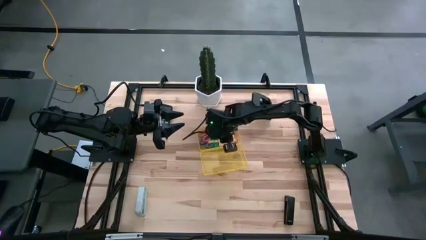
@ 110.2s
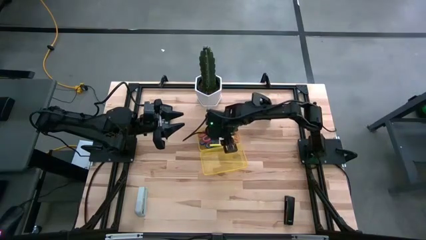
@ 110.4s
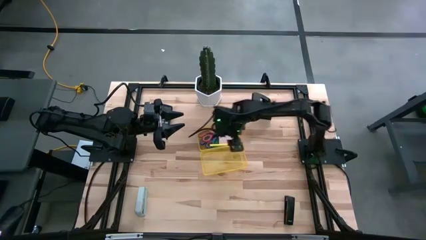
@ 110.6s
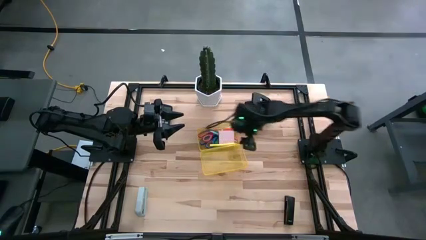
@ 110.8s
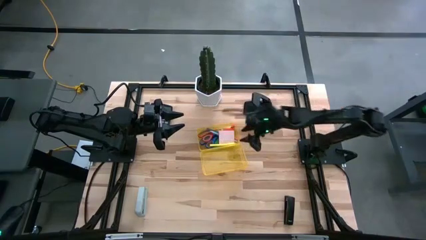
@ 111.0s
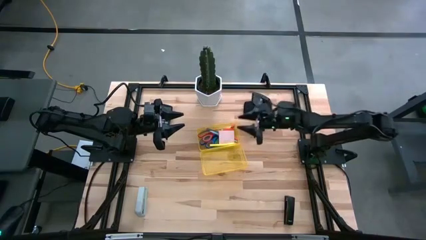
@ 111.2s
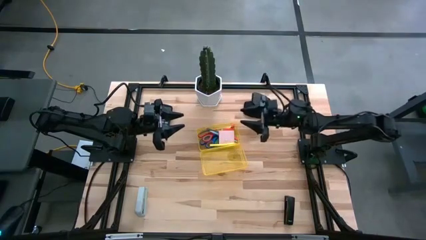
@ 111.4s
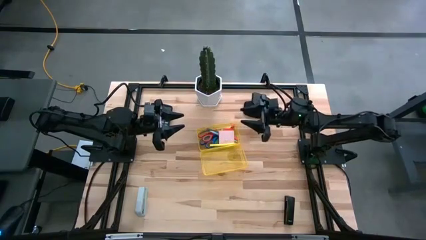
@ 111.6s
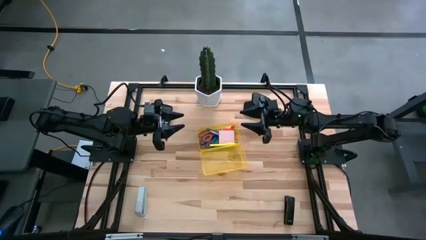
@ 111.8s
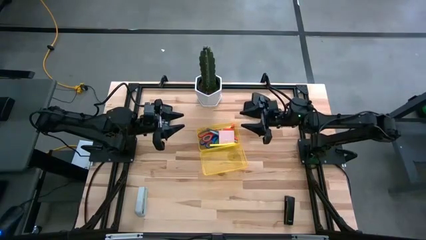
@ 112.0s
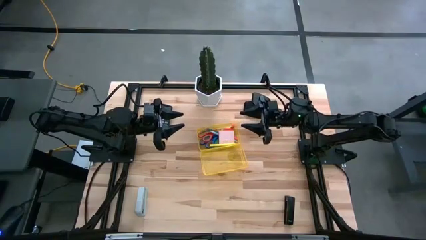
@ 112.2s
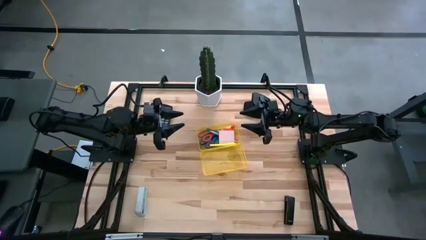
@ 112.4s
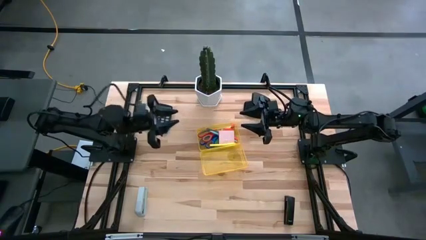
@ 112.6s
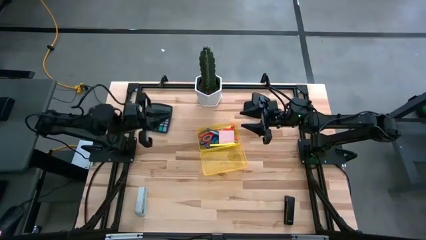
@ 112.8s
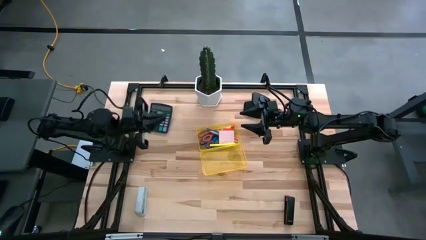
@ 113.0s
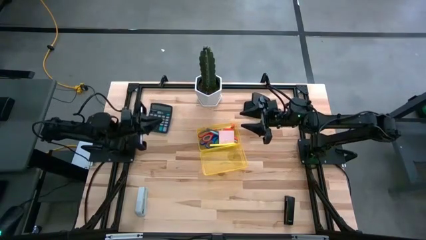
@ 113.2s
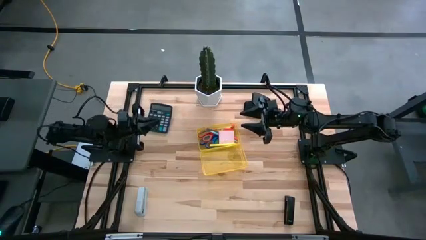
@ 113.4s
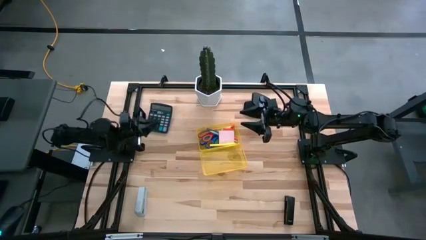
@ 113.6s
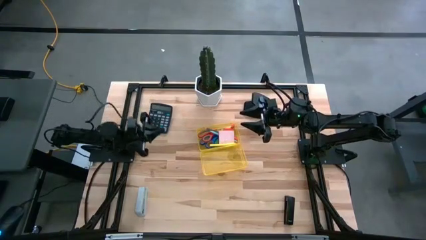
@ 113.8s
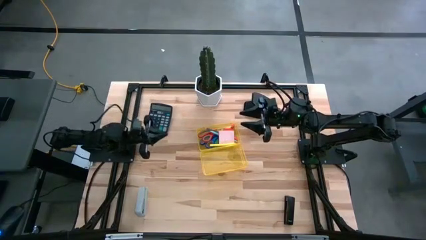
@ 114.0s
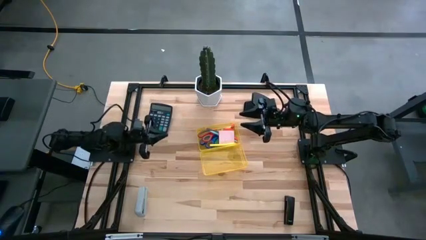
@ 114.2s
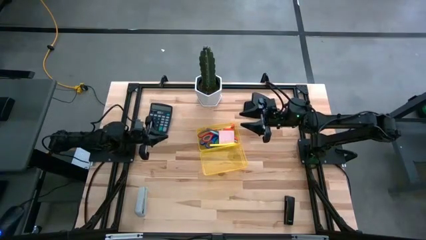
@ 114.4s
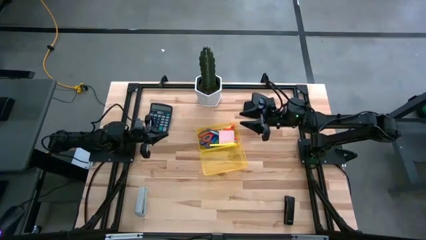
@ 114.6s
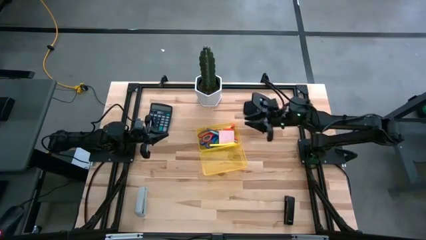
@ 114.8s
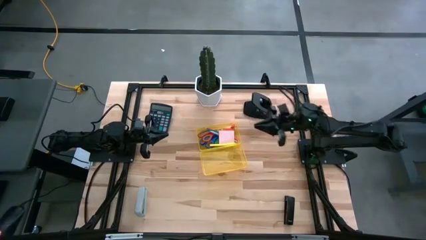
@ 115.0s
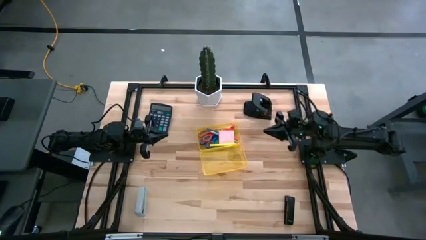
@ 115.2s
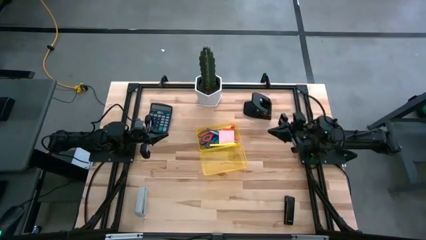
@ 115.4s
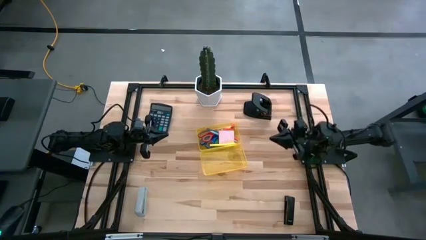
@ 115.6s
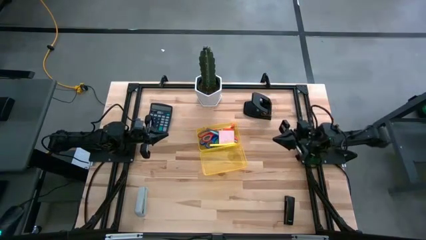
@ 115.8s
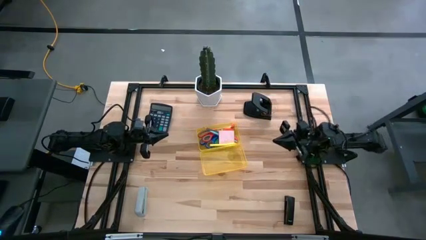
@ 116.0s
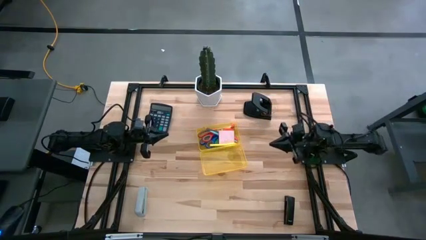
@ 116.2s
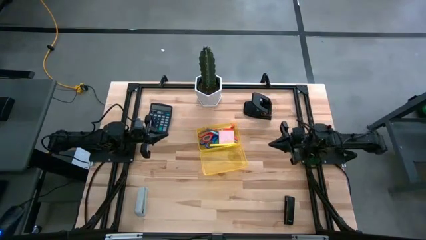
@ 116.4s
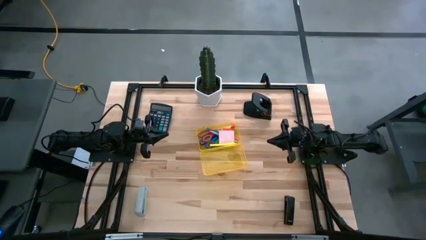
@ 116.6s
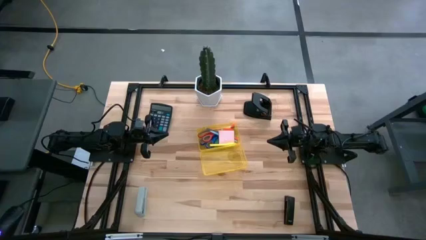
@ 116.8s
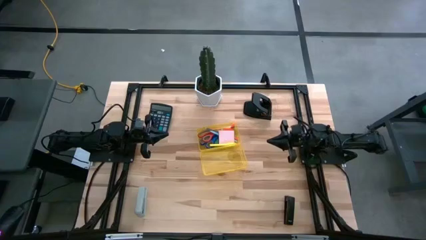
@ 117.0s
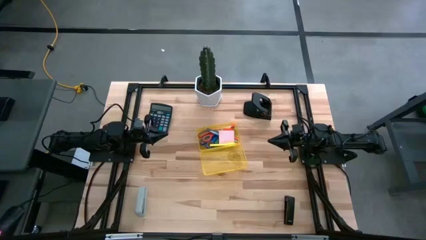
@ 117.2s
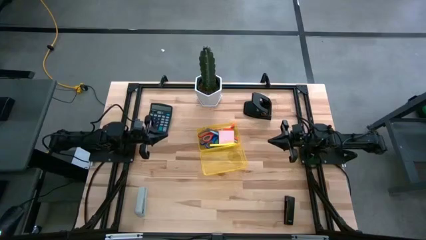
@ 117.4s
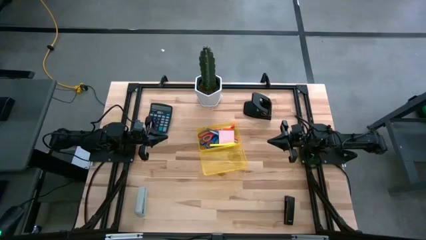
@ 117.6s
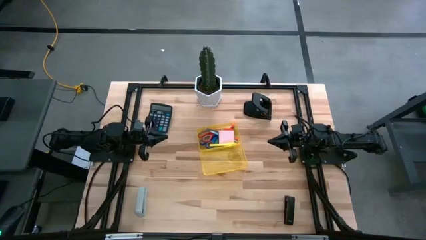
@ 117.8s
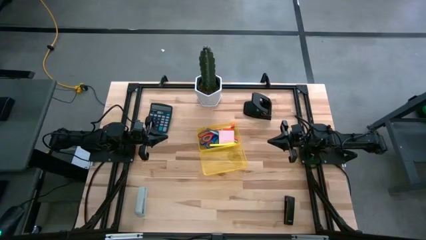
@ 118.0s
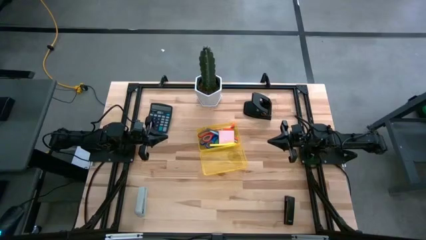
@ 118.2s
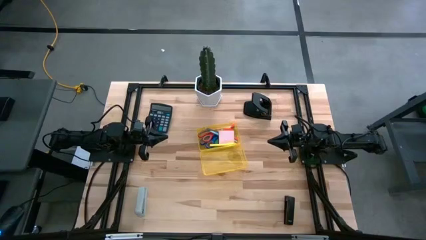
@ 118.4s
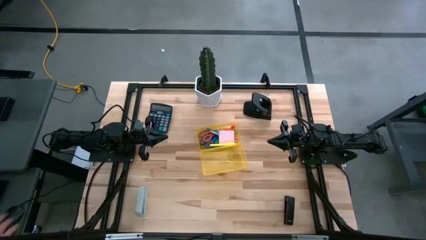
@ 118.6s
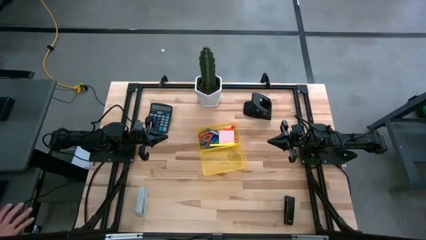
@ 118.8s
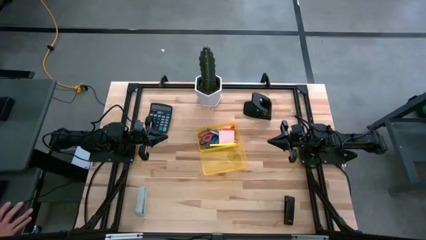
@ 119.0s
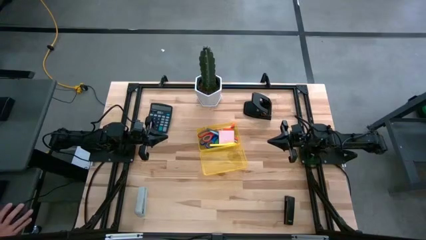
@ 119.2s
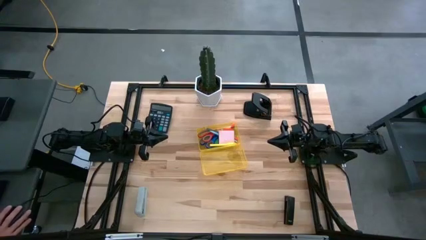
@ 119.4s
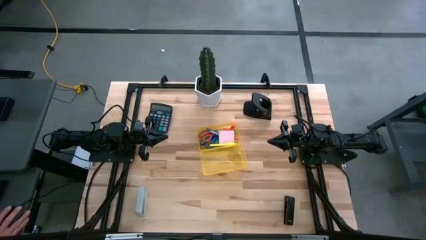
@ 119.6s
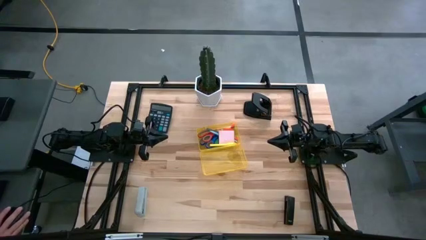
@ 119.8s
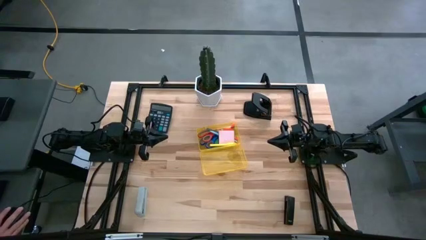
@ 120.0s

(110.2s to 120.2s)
Task: Pack school essentials
Return to Home Position

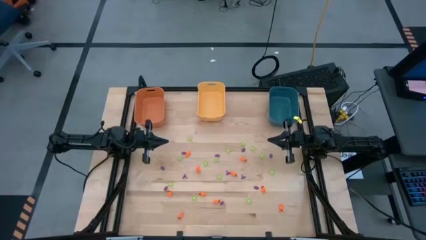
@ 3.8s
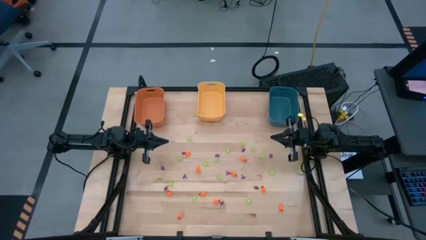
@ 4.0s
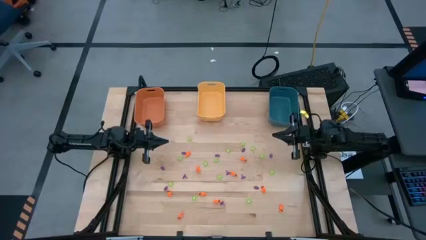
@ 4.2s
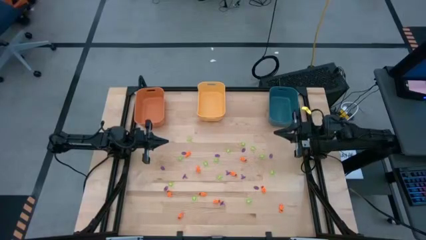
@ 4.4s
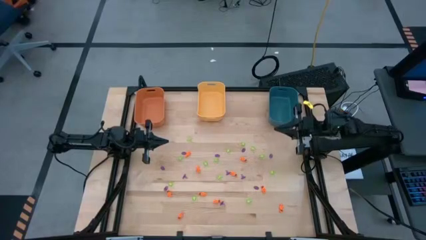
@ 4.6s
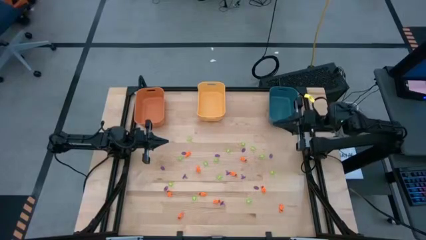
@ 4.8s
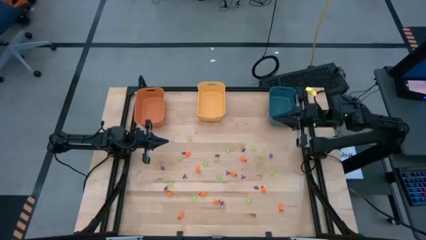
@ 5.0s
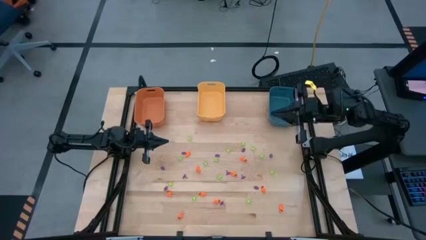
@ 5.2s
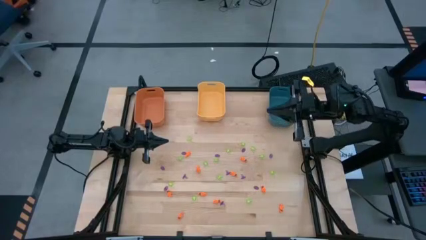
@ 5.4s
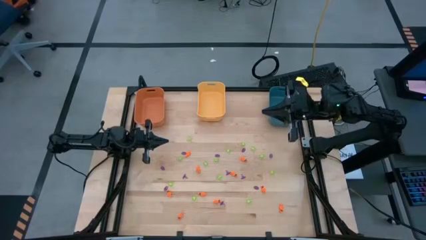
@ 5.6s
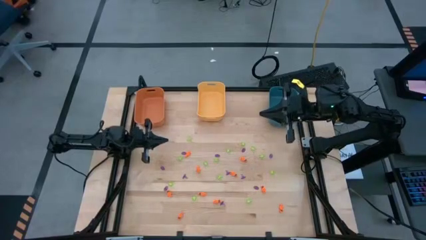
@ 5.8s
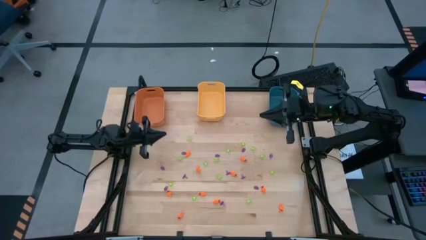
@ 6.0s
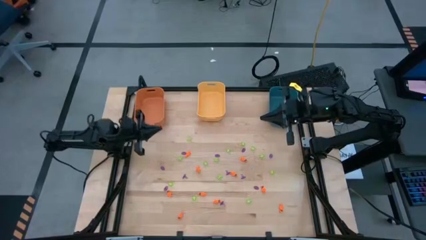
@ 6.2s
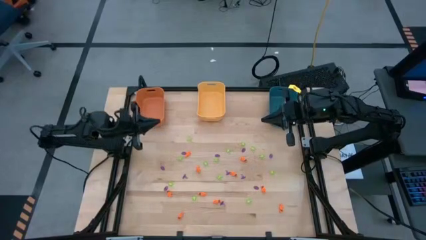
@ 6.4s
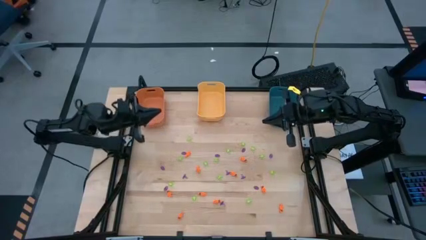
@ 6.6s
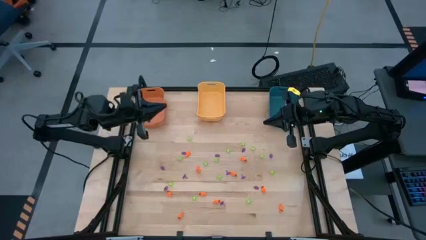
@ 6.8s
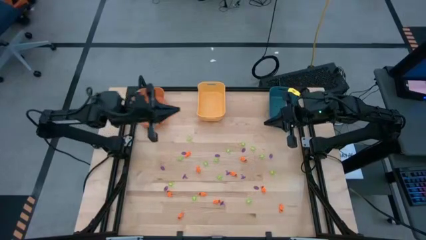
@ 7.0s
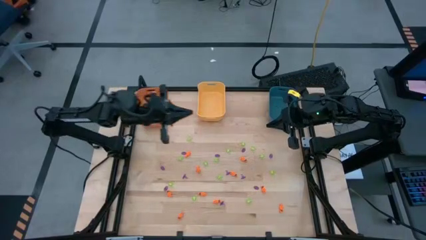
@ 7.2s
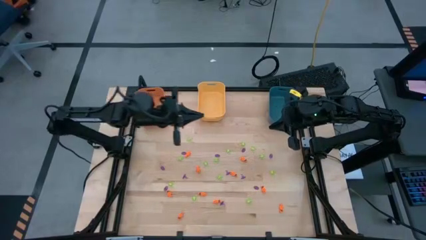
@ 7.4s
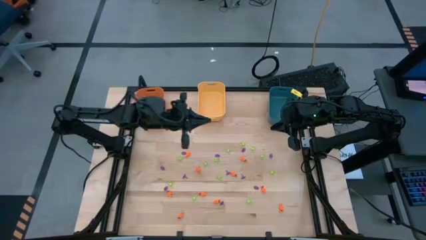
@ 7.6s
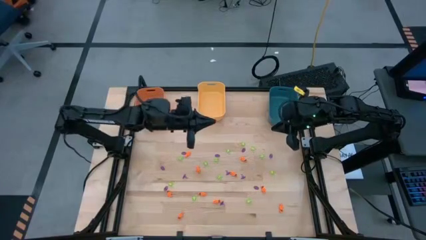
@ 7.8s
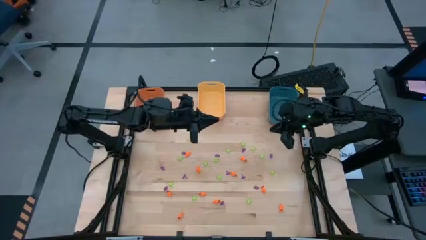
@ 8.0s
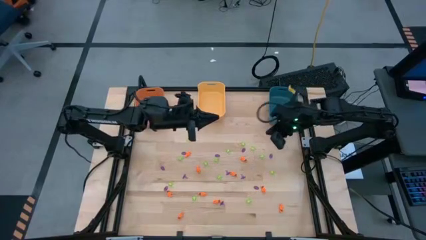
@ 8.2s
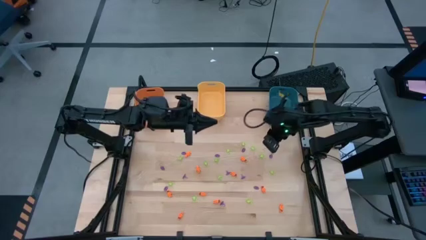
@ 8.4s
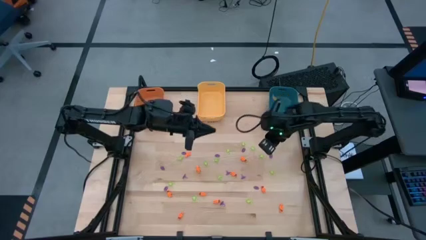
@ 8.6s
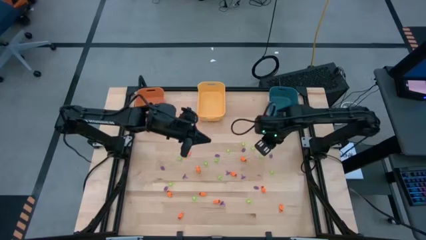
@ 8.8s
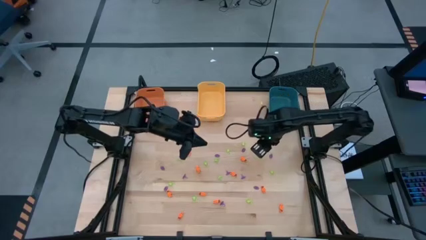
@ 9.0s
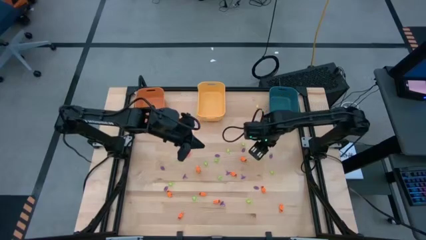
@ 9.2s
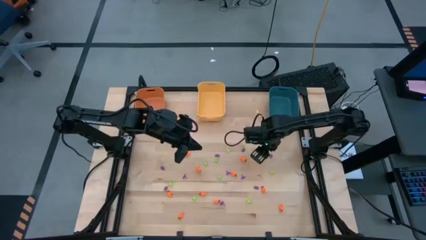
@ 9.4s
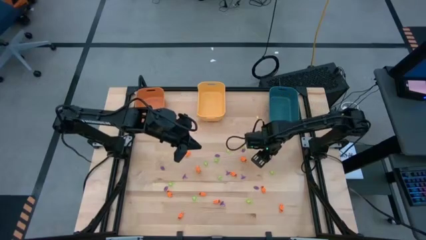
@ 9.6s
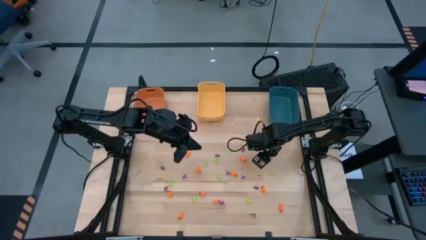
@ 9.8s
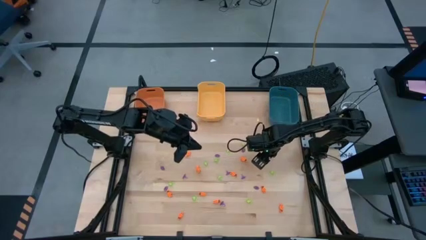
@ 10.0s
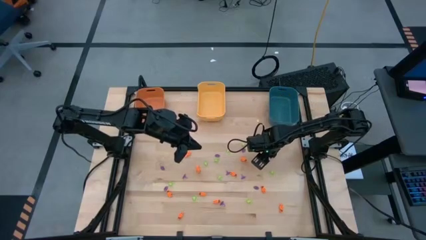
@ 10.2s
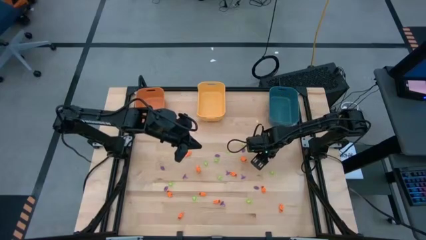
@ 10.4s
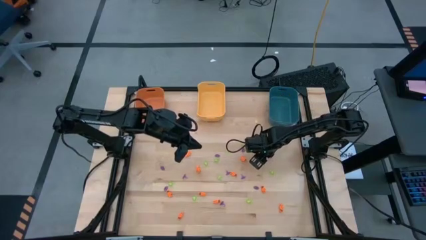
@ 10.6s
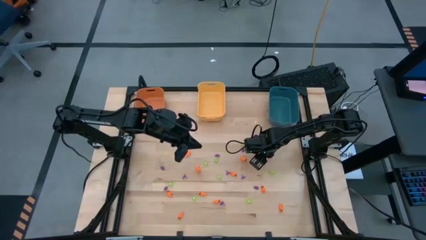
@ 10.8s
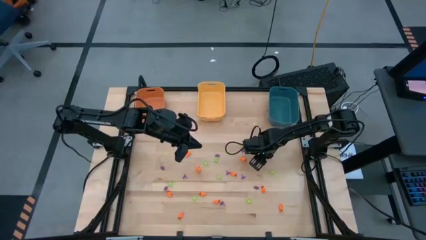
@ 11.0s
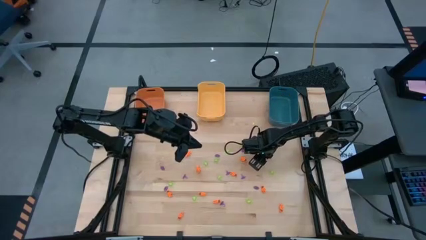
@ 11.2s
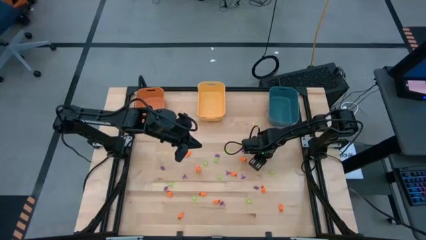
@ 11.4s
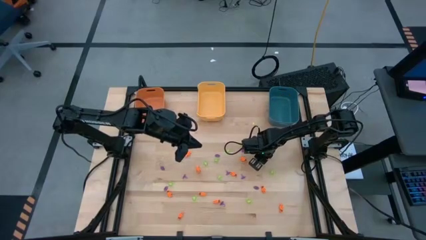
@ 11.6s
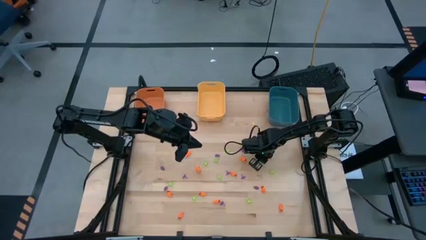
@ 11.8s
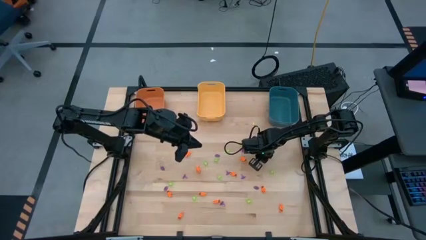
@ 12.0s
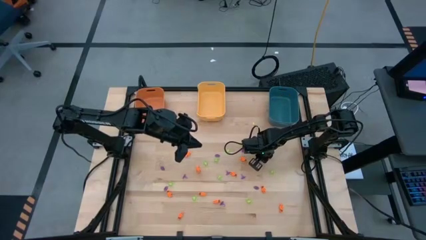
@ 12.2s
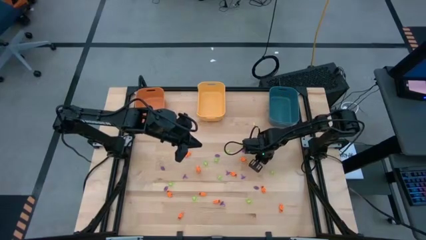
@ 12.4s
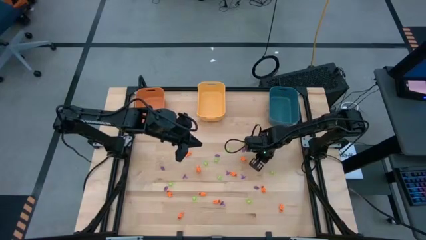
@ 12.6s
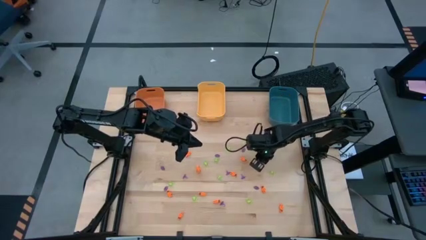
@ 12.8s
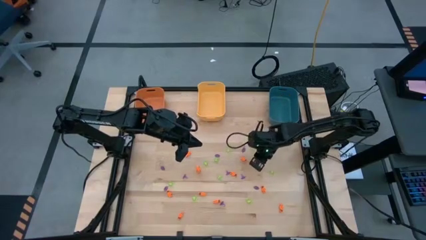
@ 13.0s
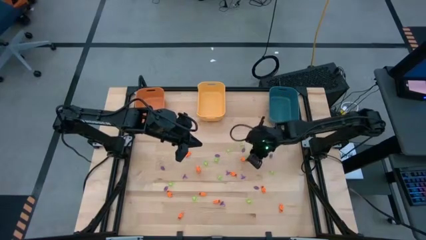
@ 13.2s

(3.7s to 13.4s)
Task: Sort Halloween decoration
Put the green spider toy into the orange bin
